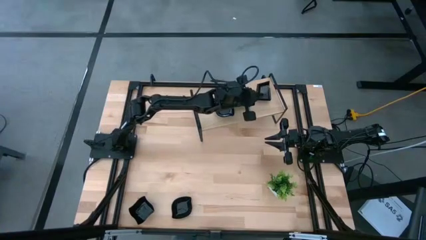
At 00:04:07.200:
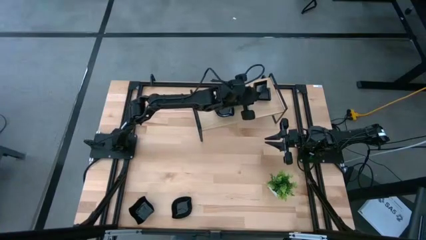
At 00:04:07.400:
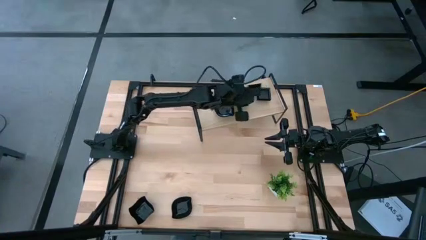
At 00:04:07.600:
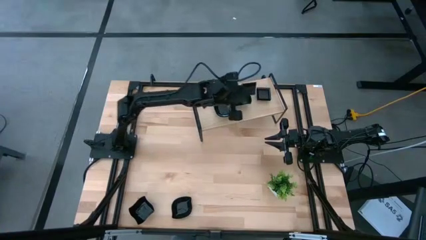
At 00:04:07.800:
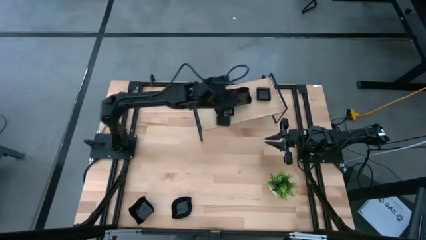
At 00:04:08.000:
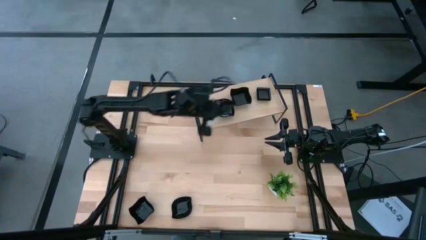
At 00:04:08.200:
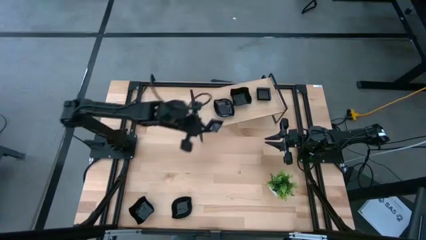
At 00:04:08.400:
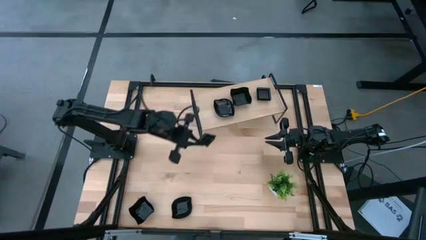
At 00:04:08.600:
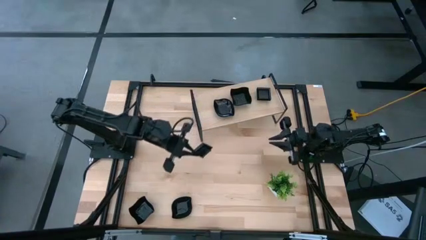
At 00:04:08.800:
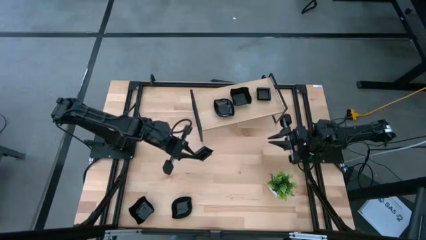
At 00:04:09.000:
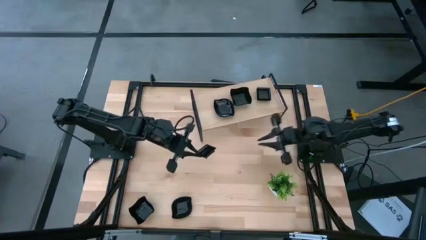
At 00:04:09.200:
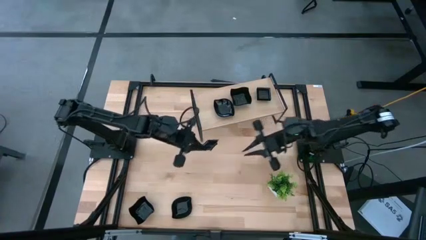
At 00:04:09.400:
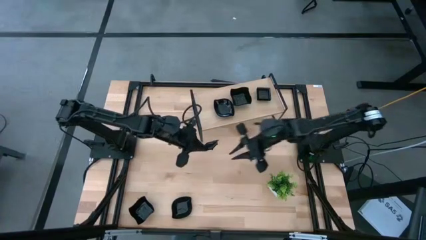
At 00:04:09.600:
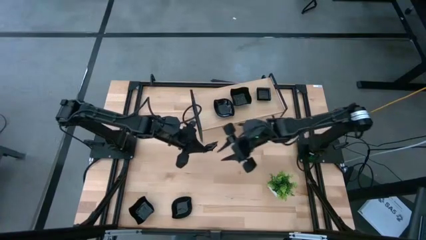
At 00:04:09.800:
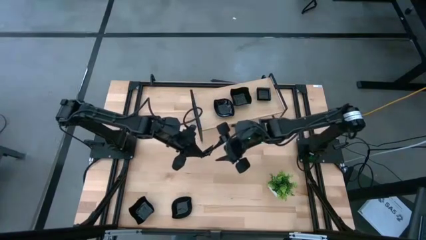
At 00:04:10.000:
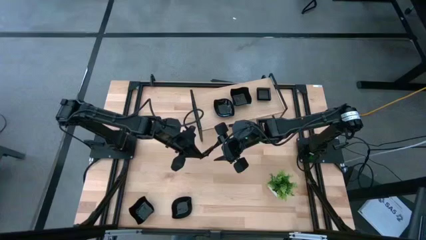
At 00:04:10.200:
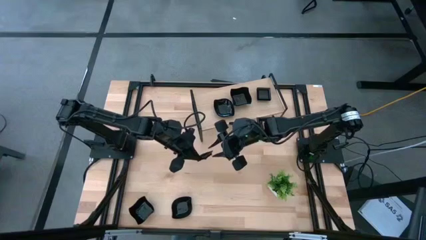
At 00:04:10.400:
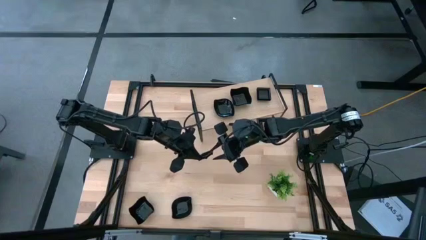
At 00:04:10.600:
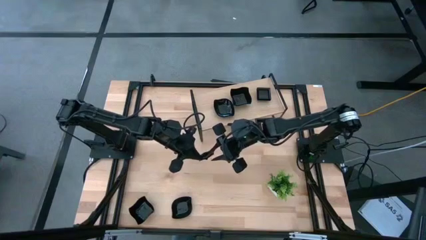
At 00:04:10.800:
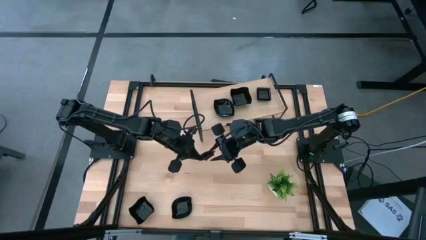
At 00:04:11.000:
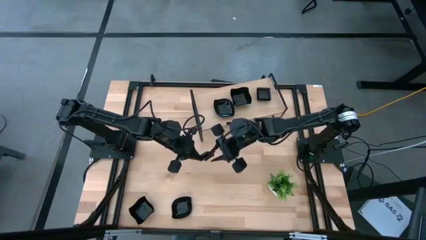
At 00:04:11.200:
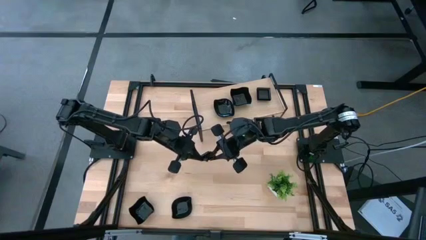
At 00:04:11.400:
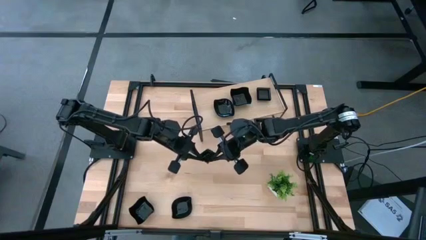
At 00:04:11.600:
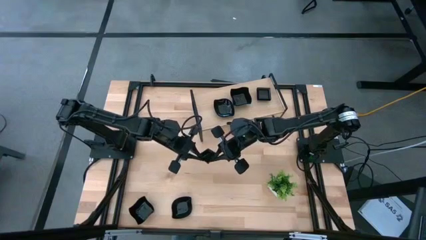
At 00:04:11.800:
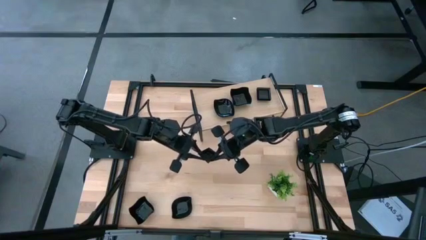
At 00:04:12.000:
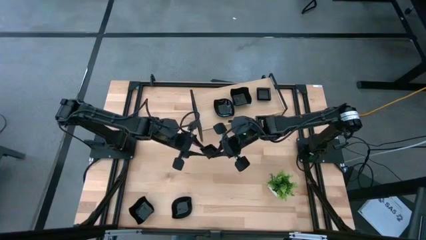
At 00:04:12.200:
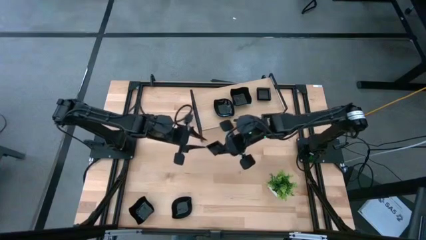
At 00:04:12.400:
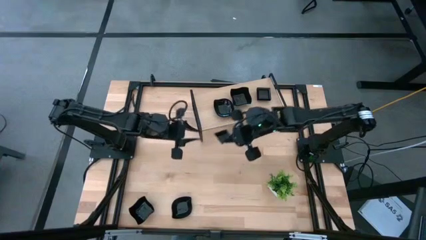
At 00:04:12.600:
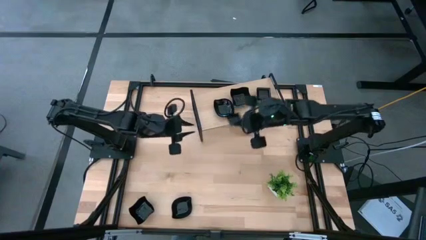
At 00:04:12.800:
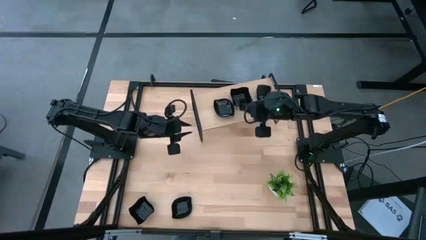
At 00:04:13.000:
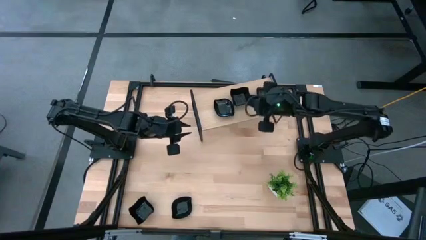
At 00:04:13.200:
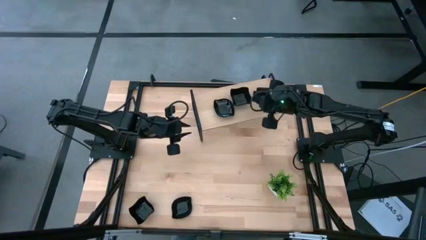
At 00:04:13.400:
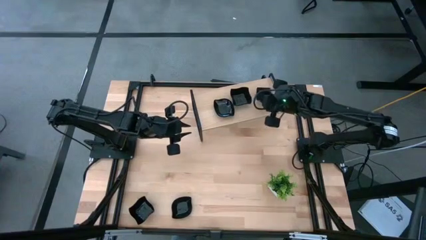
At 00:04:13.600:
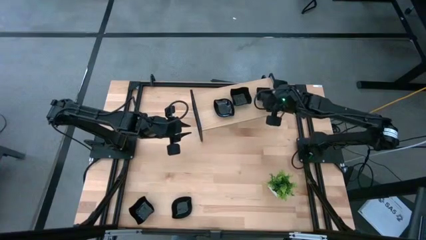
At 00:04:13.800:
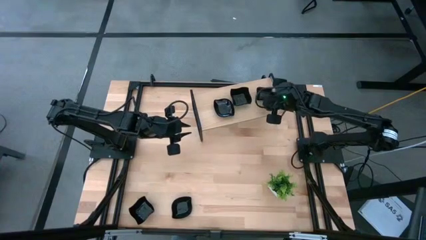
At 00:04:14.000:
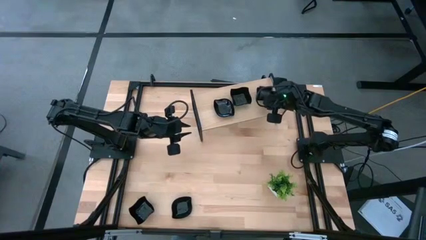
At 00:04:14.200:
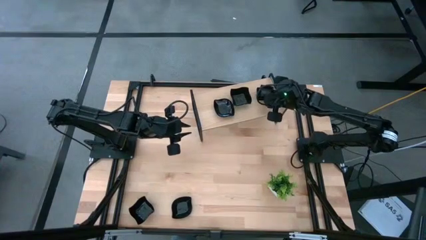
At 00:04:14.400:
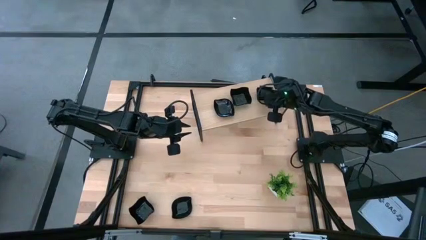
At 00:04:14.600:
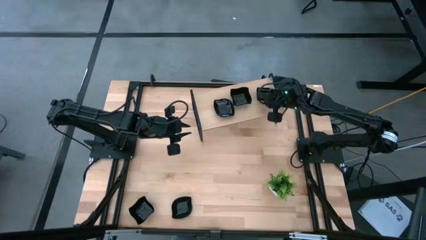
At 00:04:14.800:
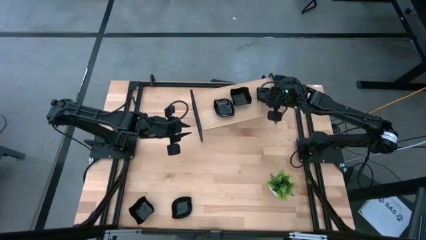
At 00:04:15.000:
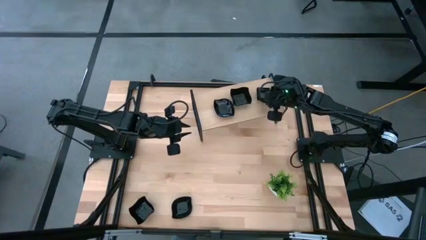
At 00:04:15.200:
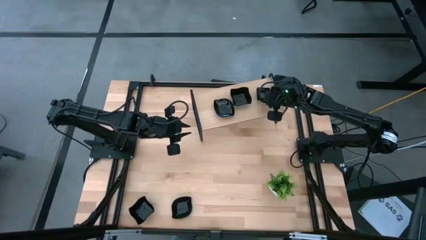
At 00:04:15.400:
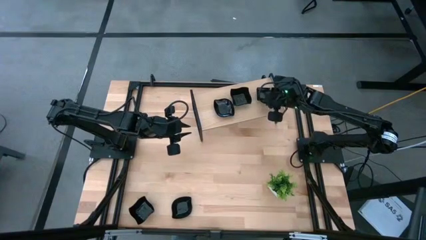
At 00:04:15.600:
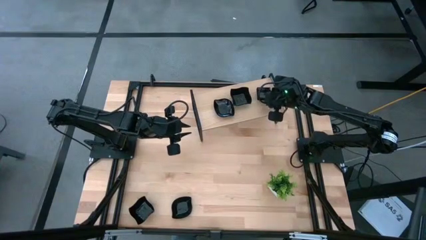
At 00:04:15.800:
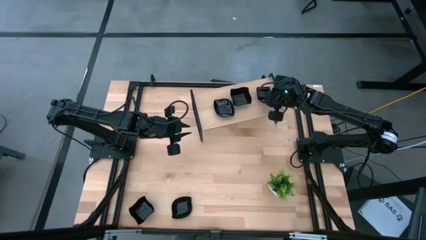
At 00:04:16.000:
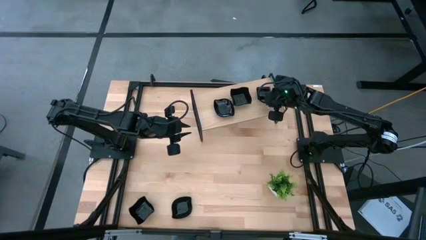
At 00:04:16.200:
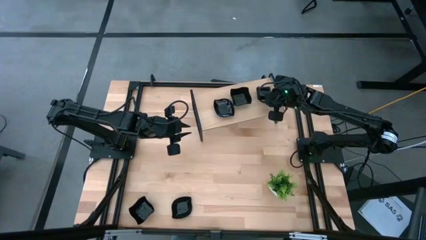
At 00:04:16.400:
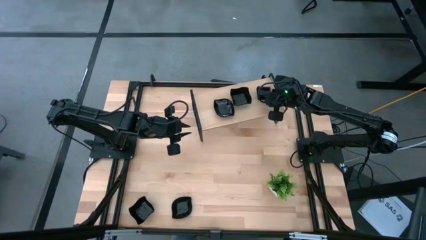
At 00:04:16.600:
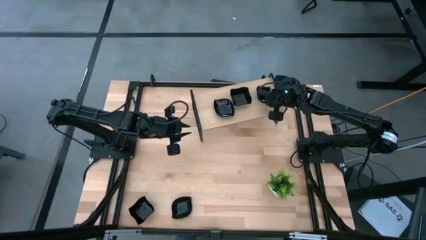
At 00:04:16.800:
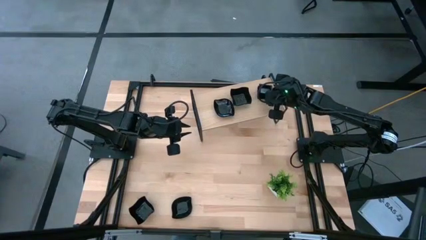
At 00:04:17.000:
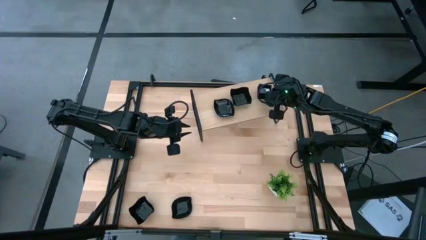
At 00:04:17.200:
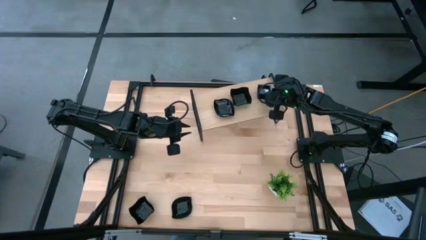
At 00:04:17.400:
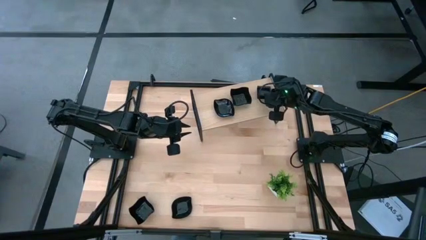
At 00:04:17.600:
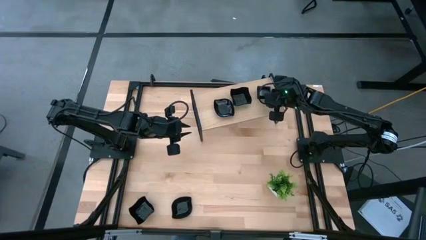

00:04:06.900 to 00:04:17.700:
Task: Pick & Place Mini shaped plates
Stack the square plate on top of the square plate on the shelf

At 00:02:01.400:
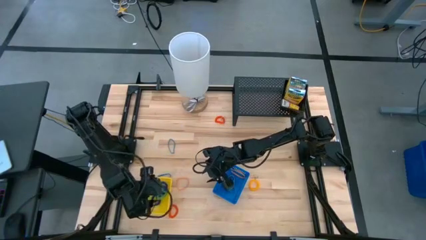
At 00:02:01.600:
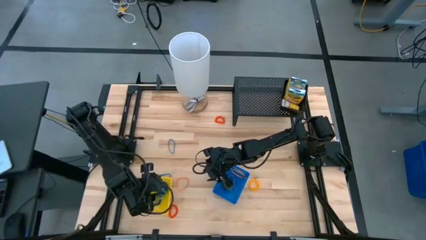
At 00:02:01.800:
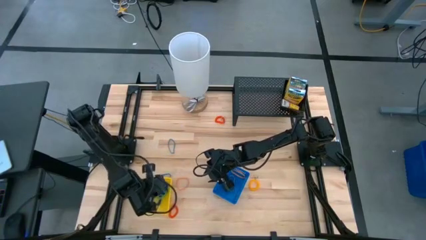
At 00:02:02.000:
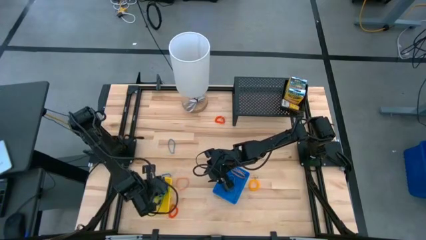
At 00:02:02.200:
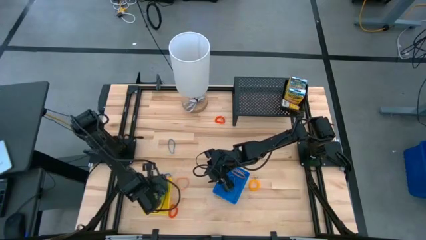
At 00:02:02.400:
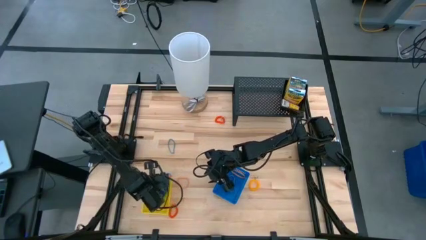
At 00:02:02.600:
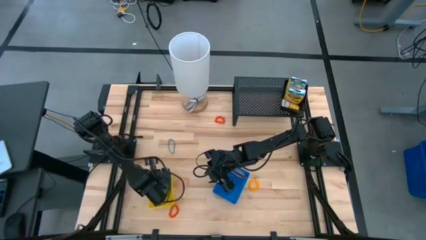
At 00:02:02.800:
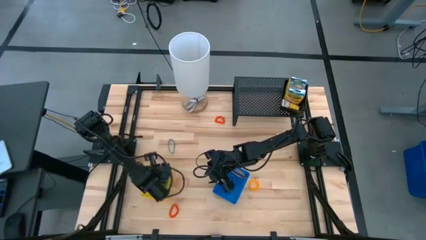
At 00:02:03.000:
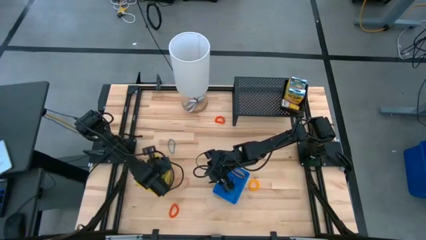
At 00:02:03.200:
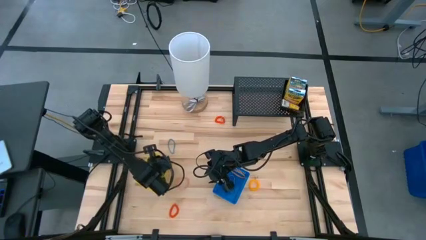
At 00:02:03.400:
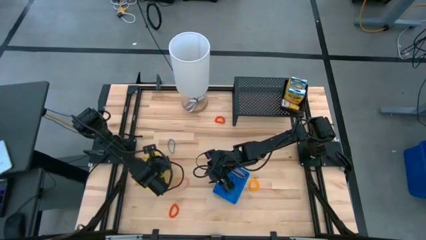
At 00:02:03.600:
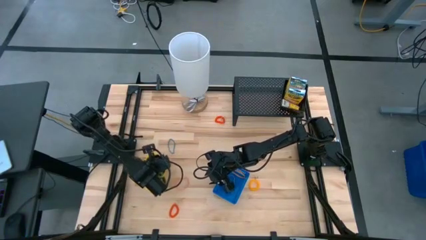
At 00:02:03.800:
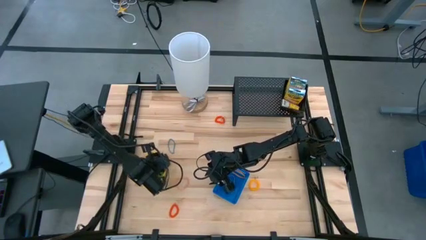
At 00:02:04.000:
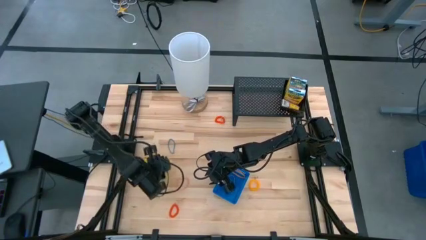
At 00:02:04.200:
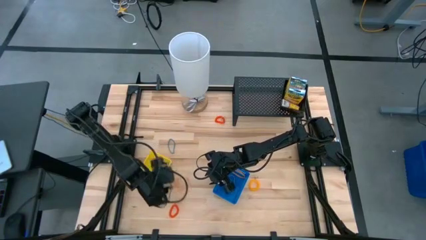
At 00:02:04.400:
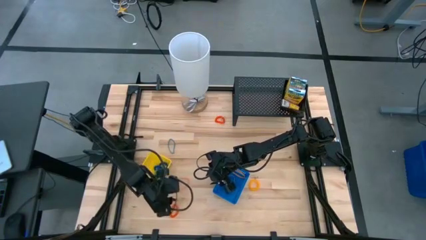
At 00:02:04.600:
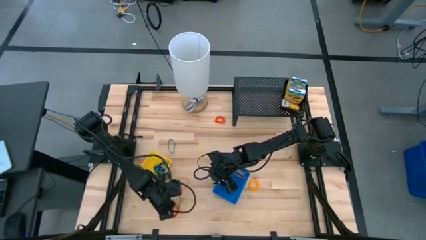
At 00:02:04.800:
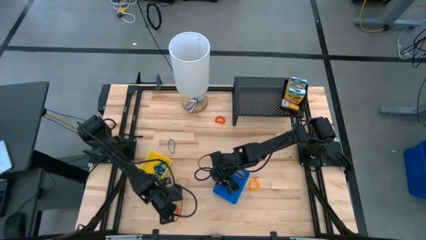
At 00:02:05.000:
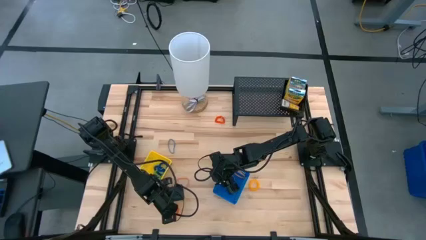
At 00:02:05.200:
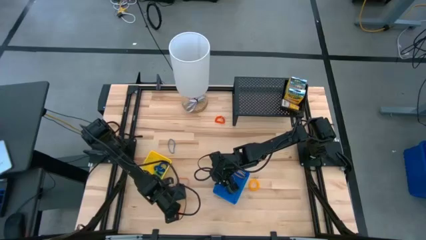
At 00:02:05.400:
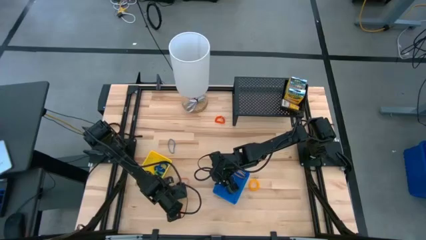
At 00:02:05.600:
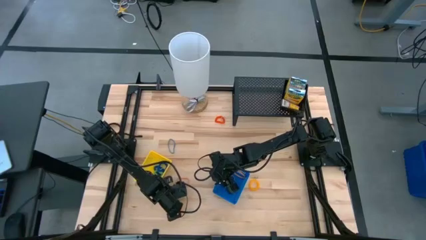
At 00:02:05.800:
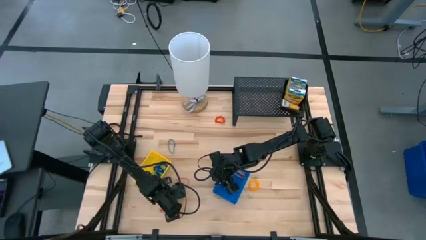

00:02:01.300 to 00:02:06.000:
Task: Pick & Place Office Desk Supplies
Put the orange spring keychain into the yellow bin

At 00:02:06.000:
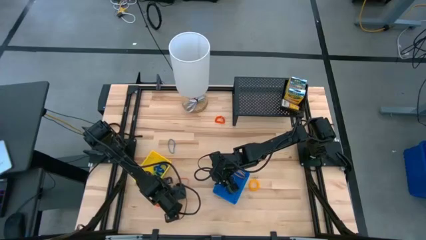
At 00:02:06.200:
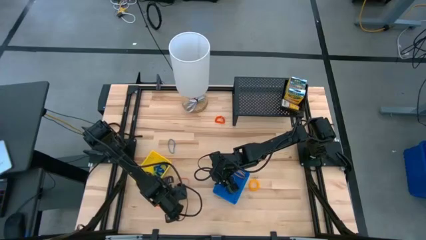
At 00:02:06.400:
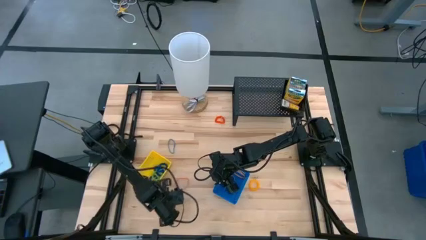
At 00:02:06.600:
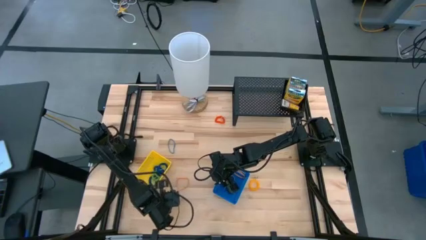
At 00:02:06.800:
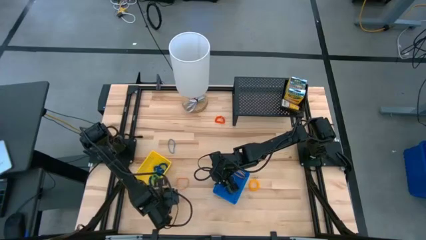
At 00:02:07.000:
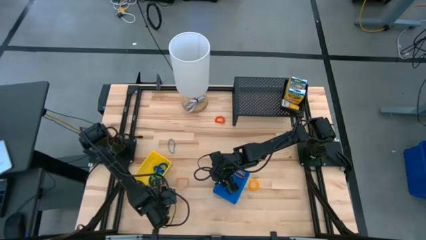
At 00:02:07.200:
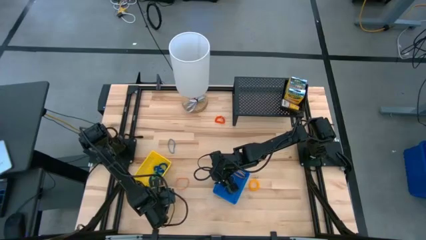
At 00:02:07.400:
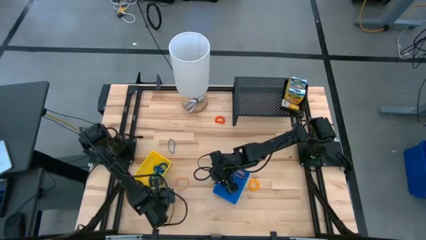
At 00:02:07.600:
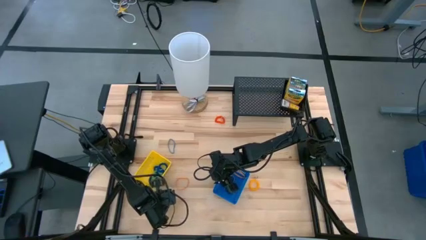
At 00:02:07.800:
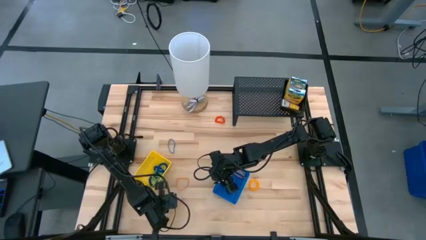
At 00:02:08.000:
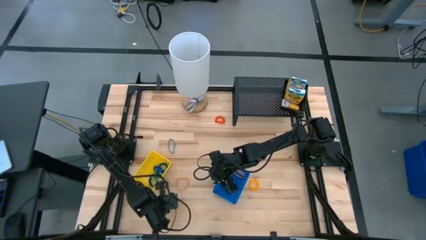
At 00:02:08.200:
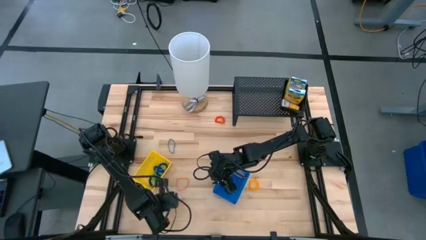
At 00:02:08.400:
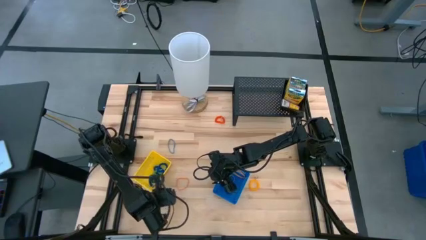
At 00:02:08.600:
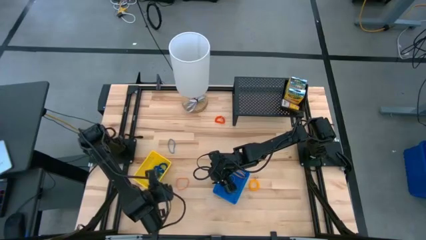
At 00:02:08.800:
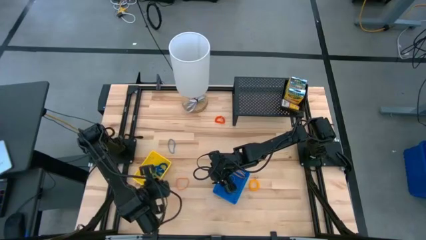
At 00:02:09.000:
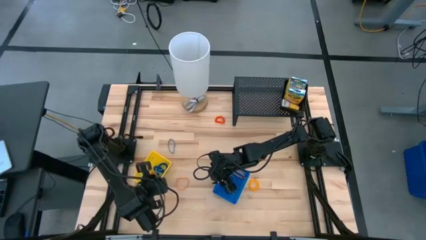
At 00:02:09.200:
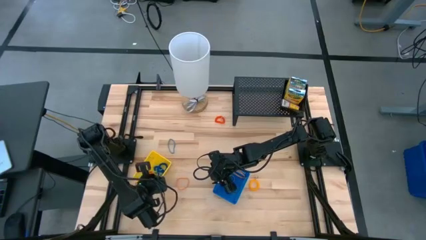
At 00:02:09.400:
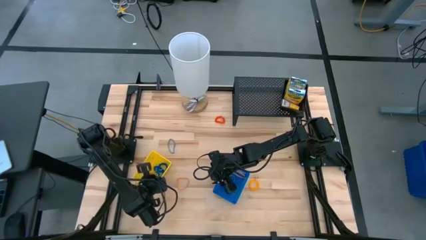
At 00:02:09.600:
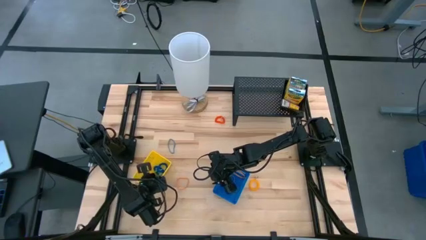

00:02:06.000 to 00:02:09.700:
Put the orange spring keychain into the yellow bin
